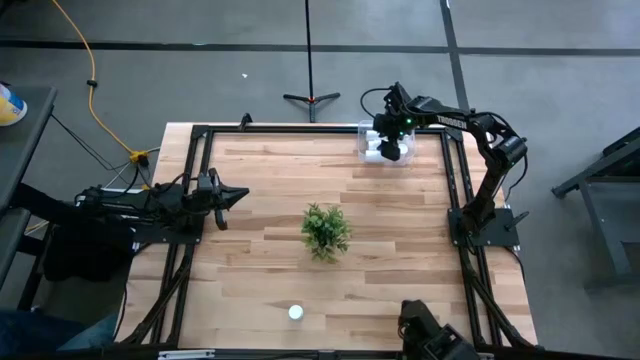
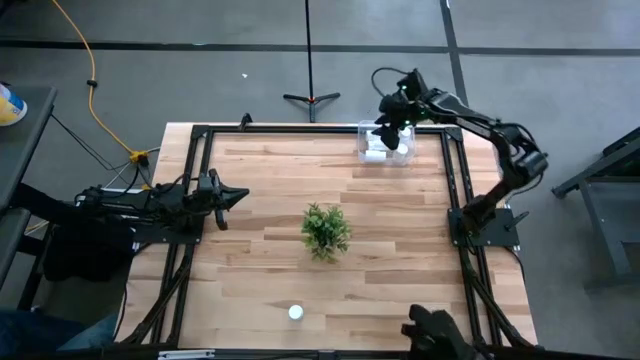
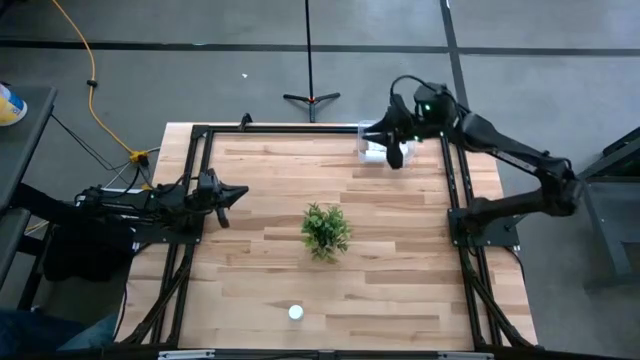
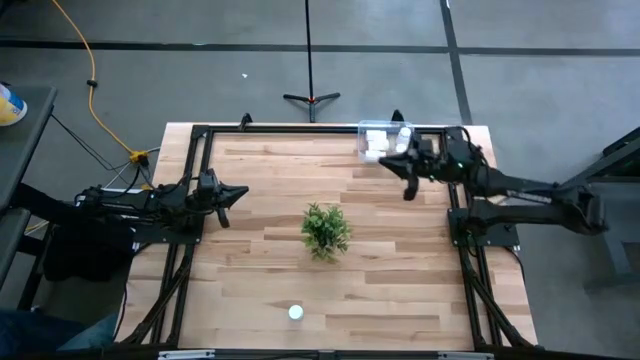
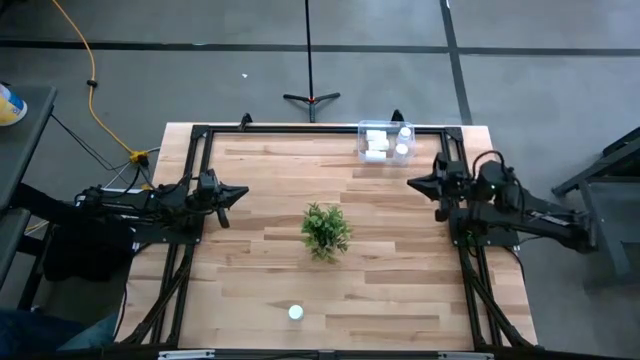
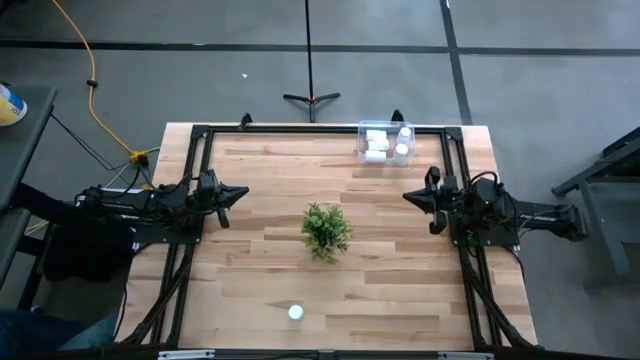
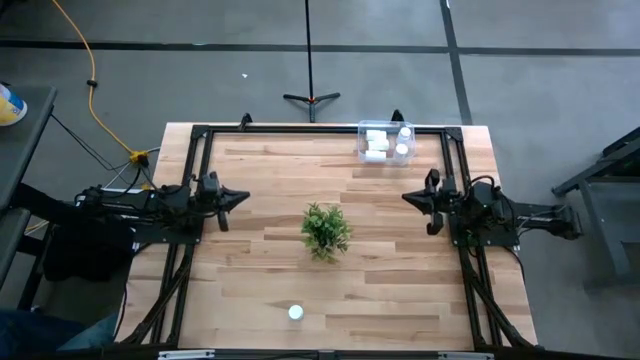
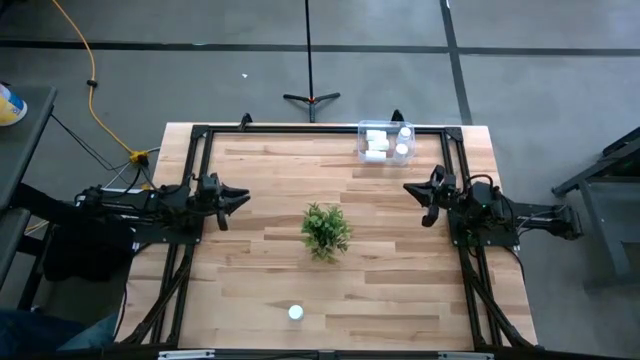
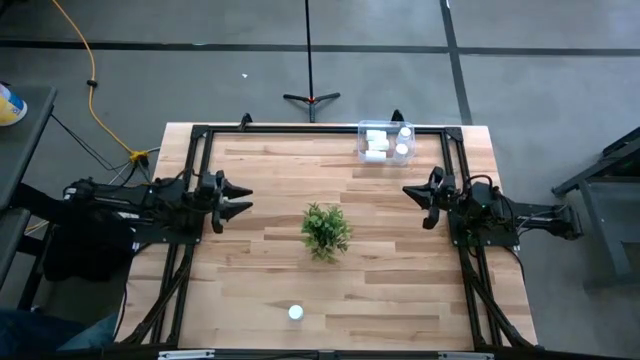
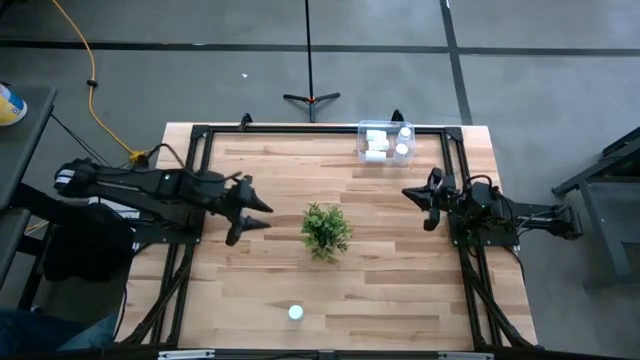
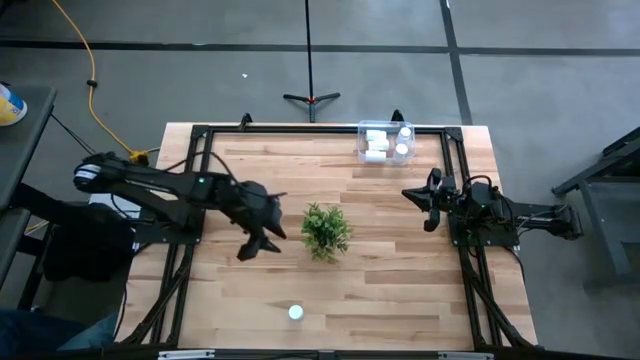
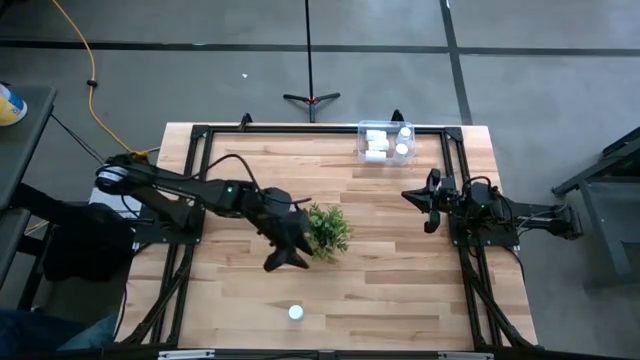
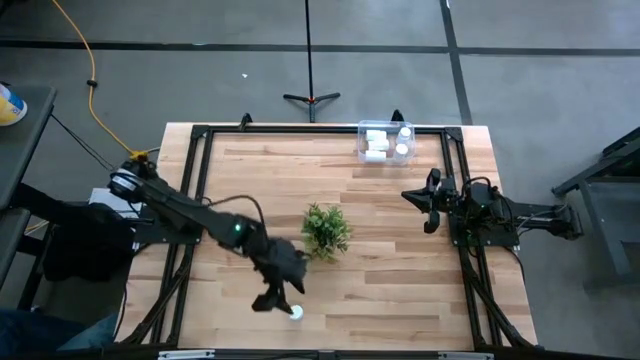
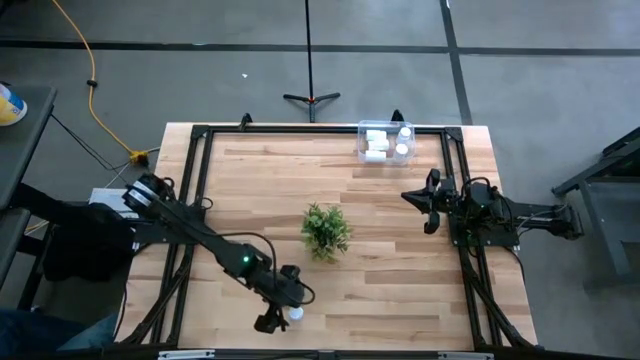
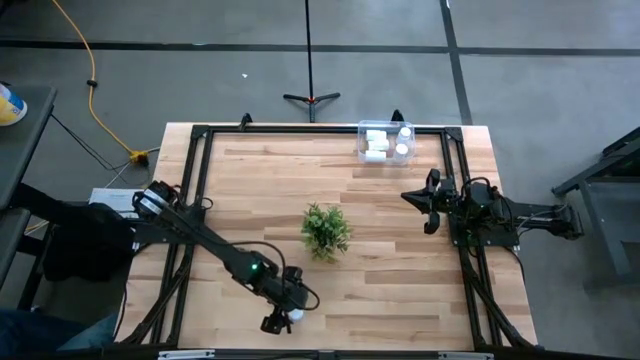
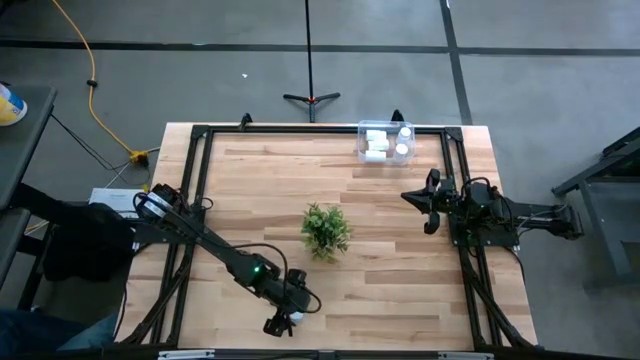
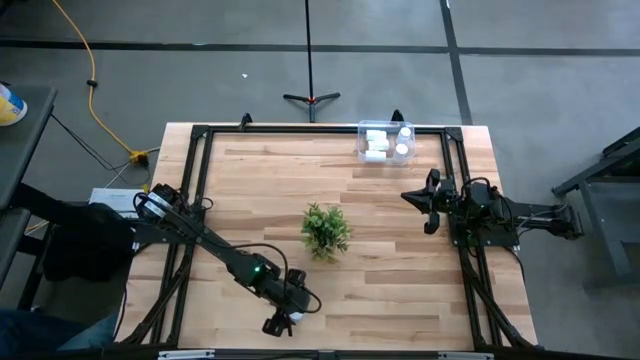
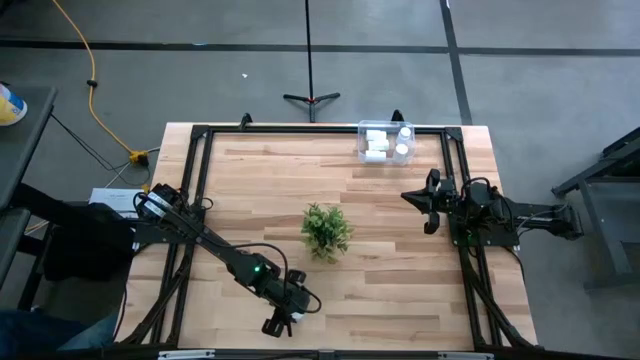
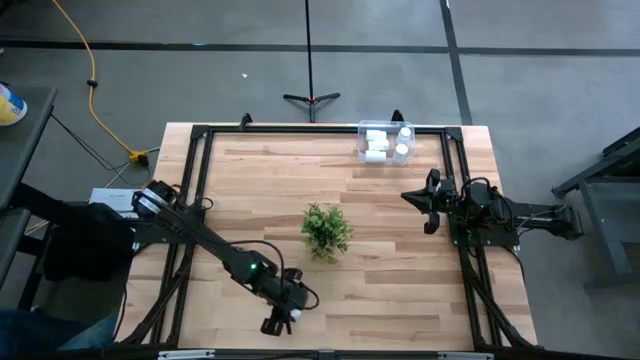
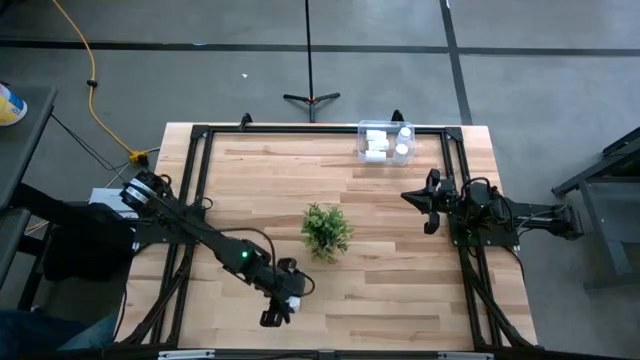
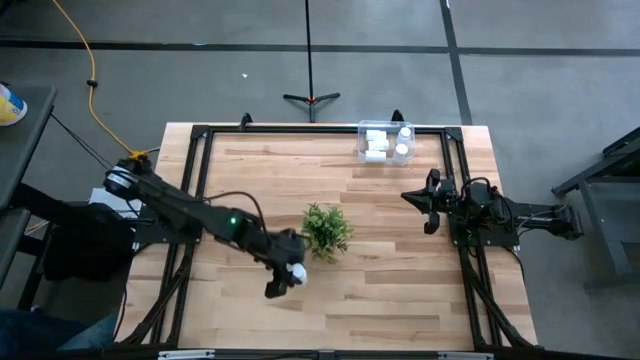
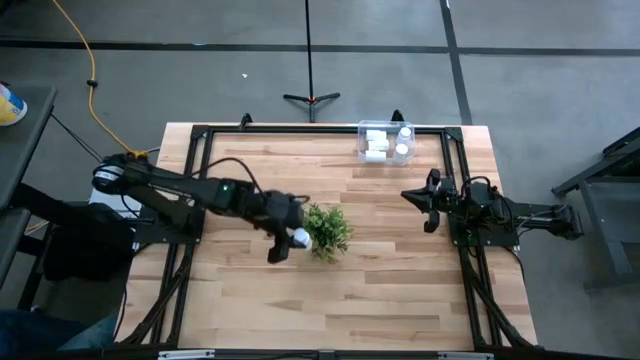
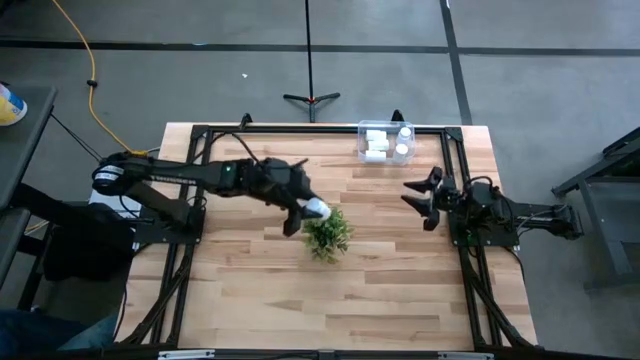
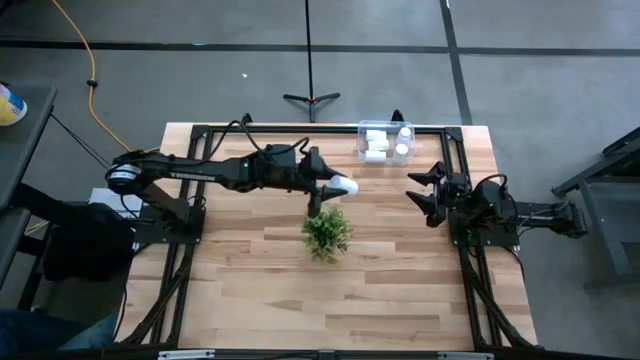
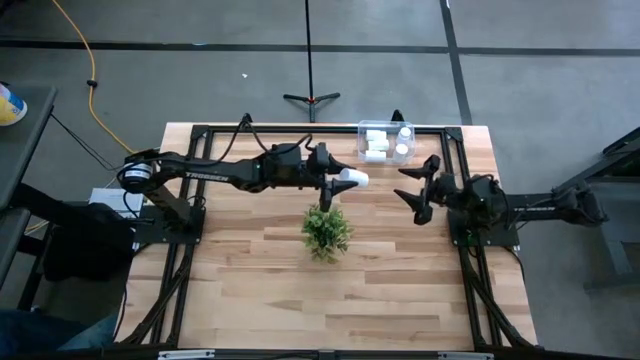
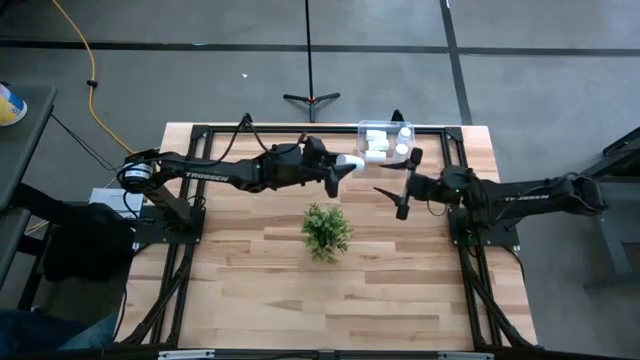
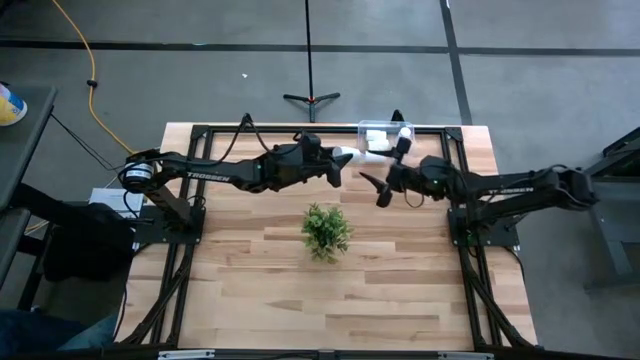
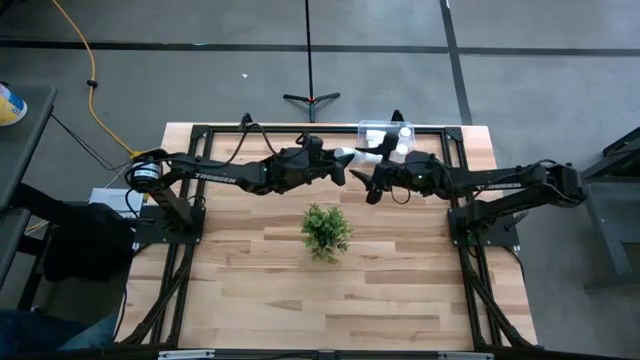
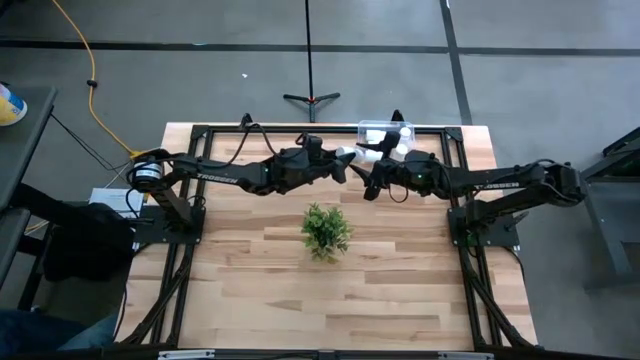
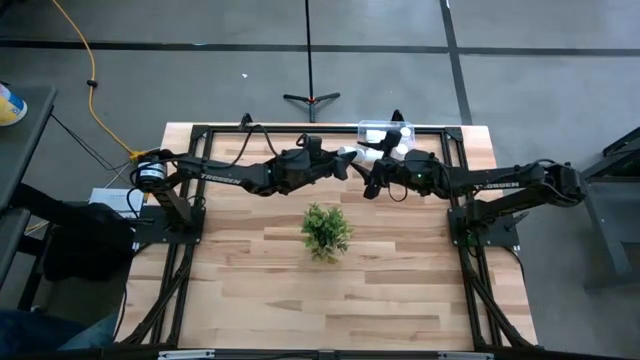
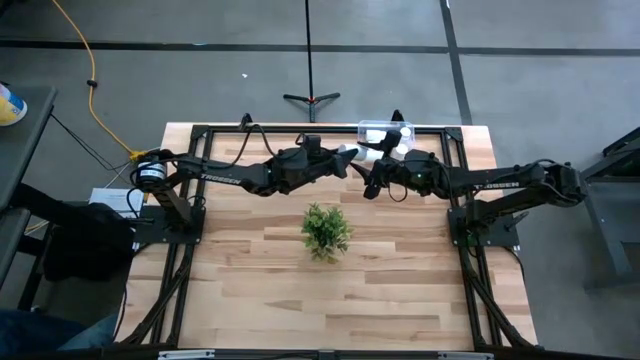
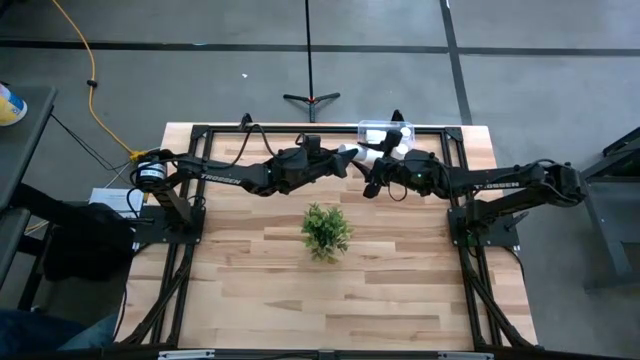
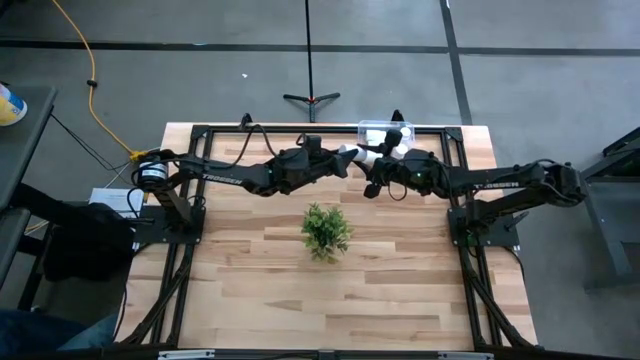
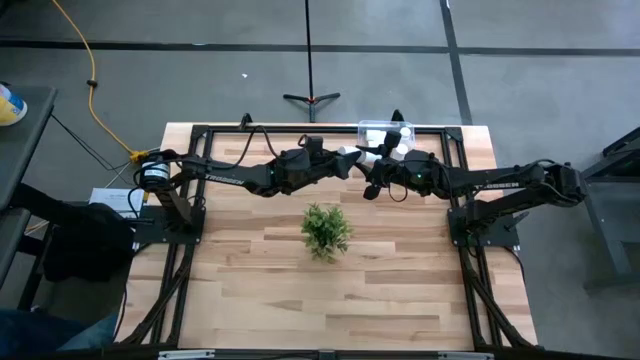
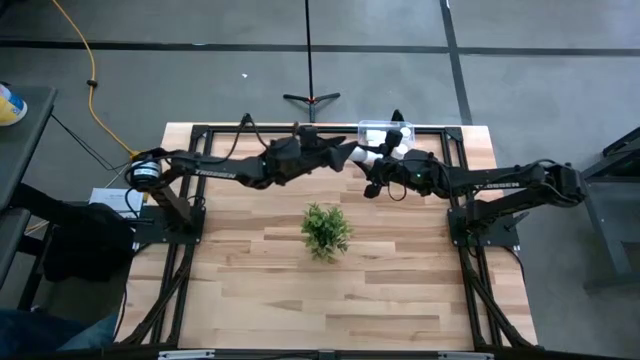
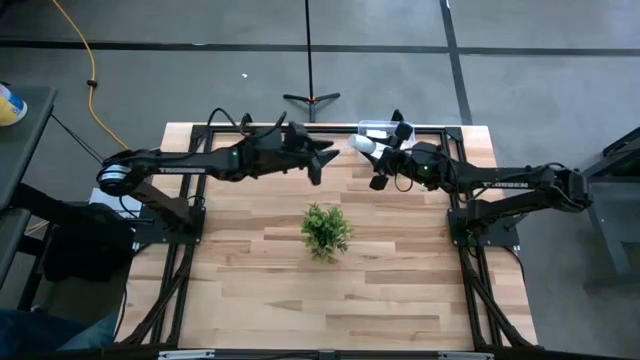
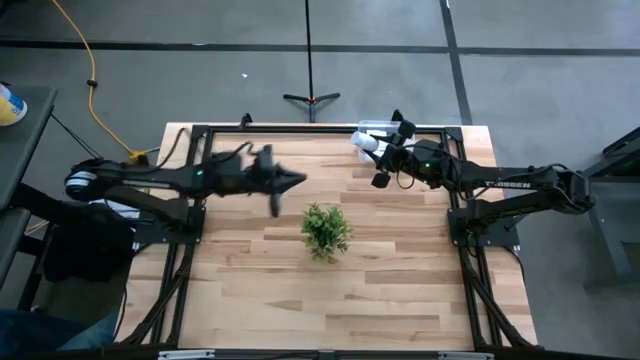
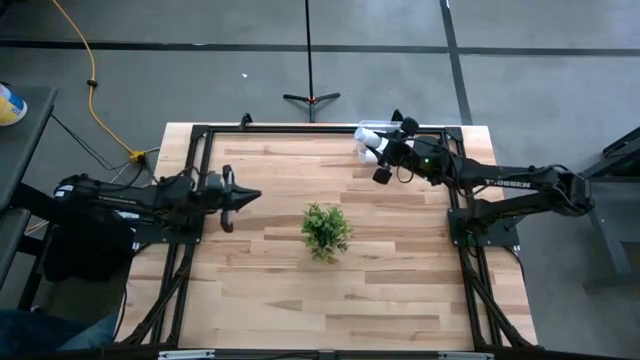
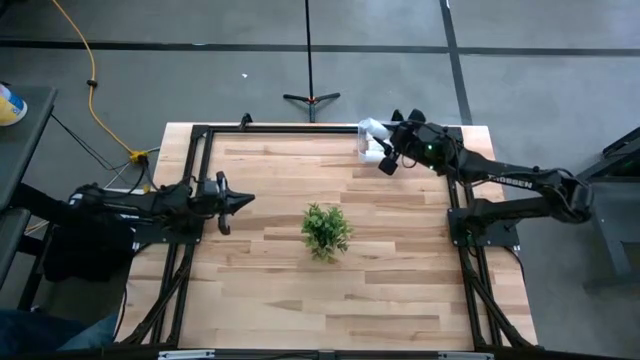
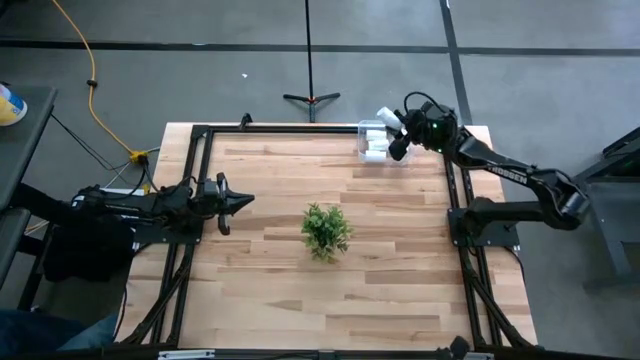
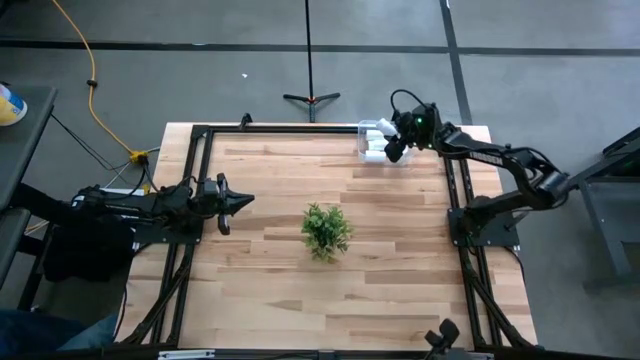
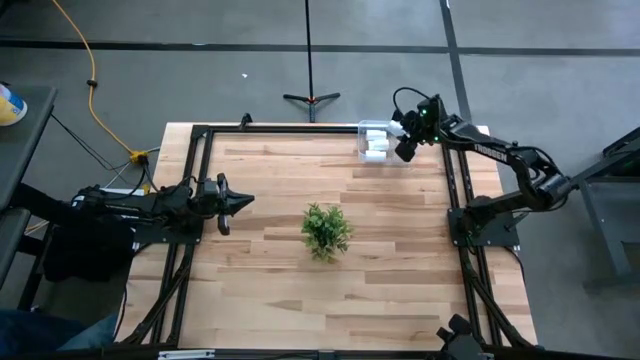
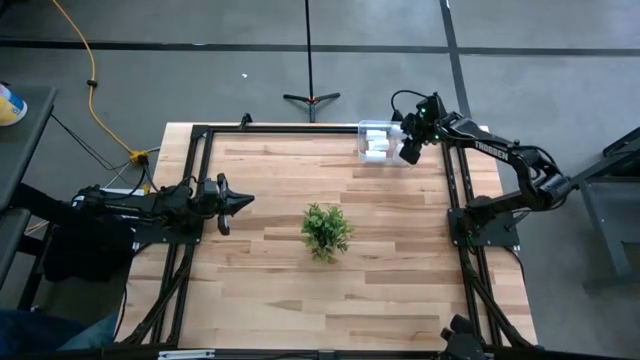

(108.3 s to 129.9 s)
Task: Pick and place pill bottles into a basket
Put the white pill bottle into the transparent bin

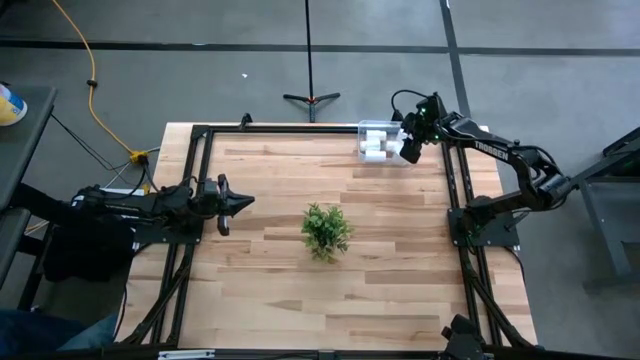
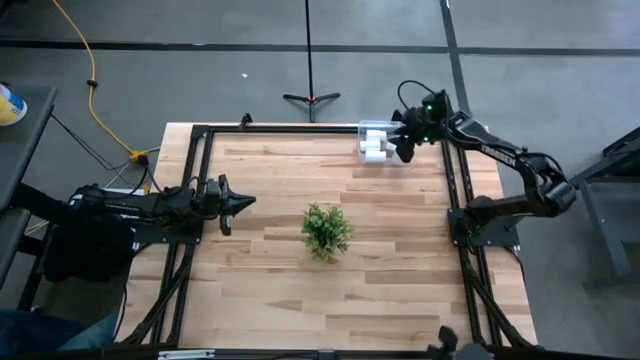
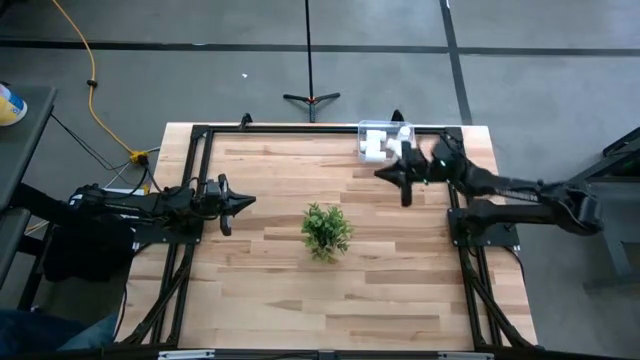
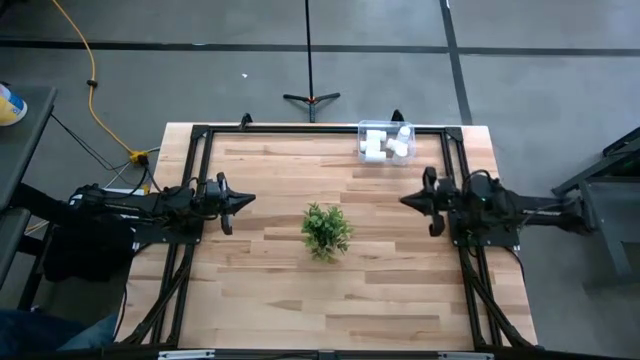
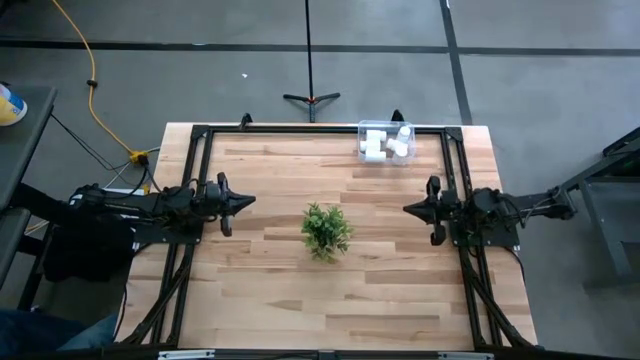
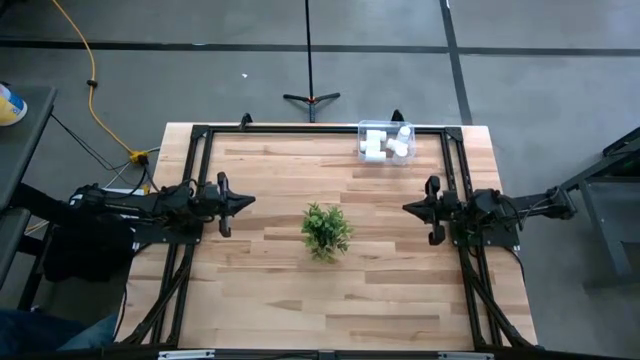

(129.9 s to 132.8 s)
Return to Home Position
